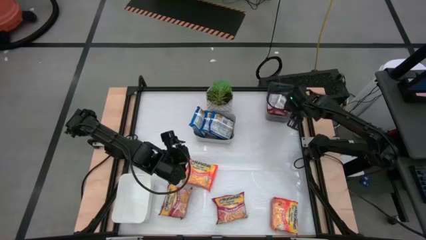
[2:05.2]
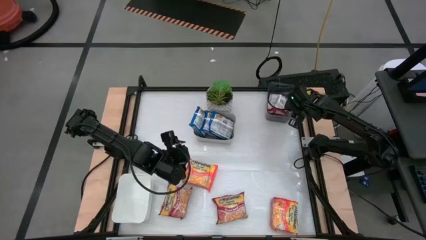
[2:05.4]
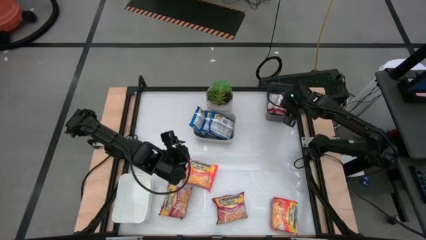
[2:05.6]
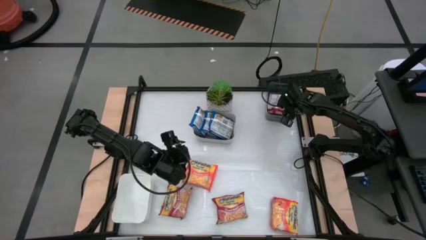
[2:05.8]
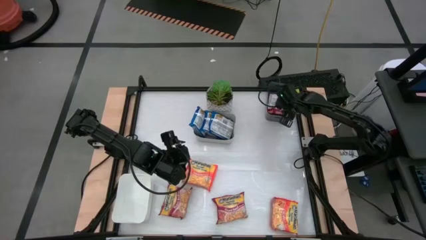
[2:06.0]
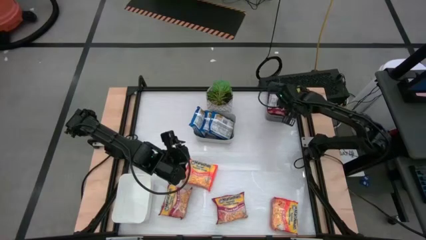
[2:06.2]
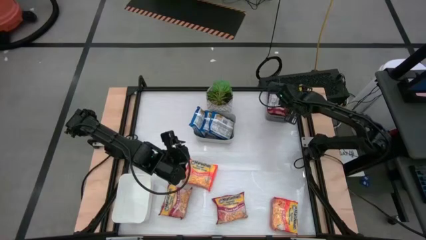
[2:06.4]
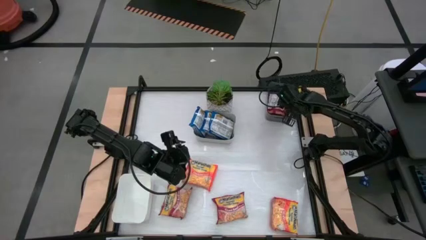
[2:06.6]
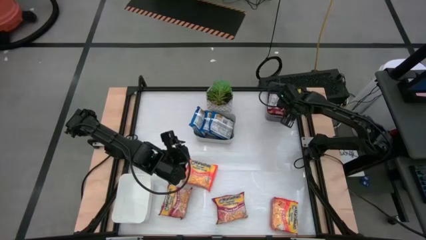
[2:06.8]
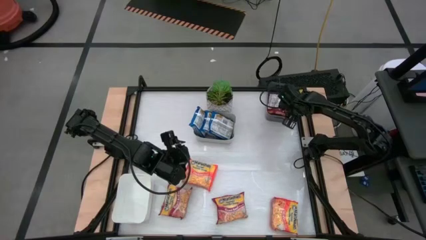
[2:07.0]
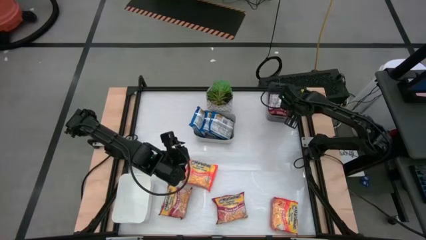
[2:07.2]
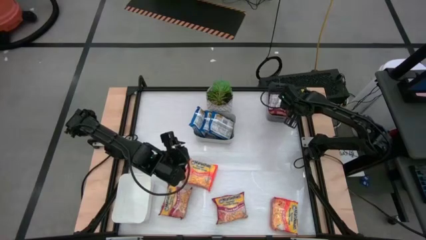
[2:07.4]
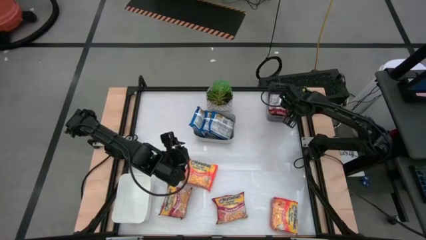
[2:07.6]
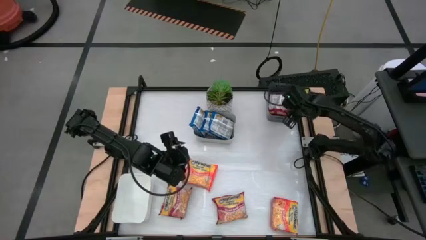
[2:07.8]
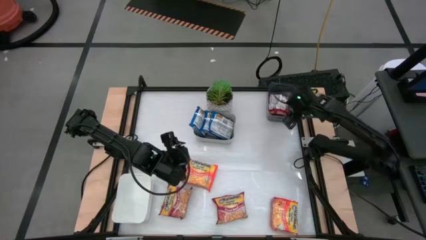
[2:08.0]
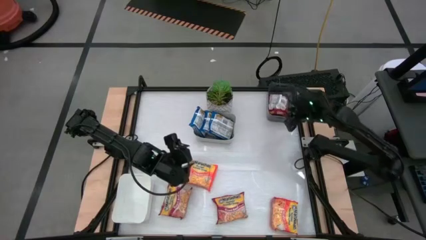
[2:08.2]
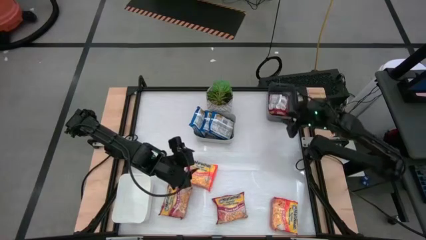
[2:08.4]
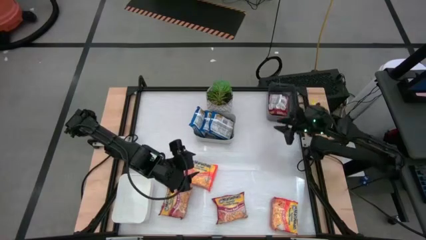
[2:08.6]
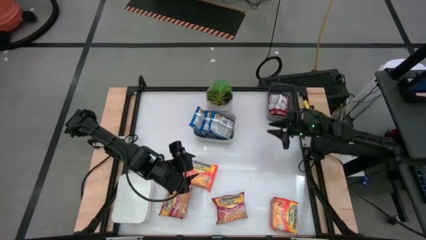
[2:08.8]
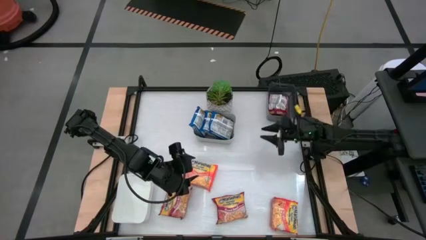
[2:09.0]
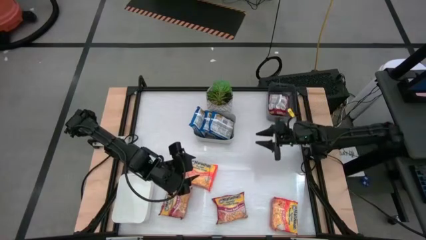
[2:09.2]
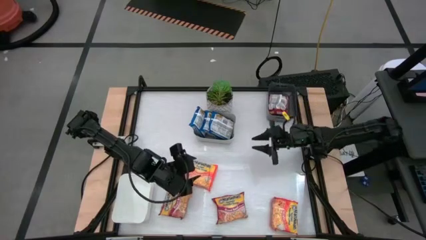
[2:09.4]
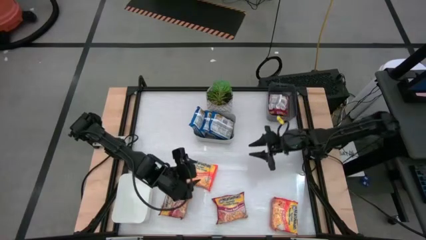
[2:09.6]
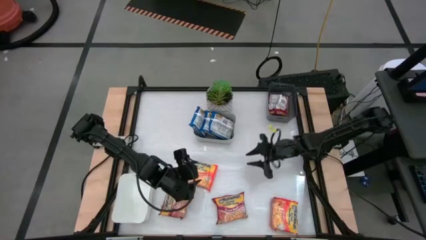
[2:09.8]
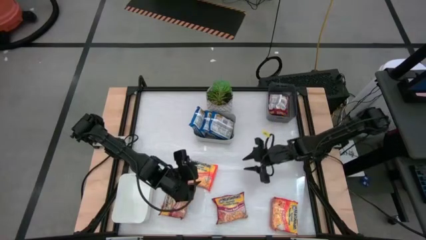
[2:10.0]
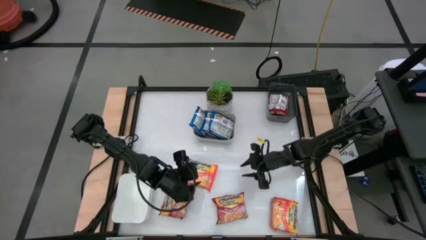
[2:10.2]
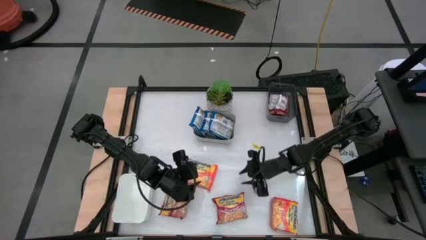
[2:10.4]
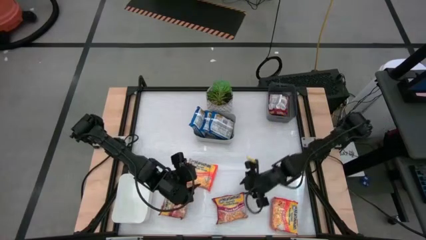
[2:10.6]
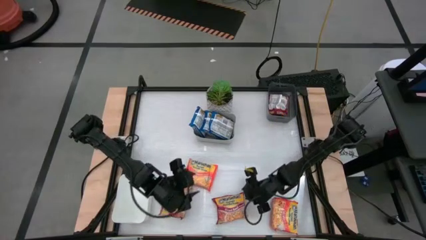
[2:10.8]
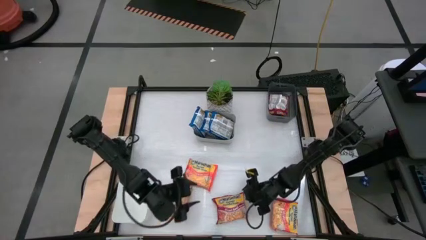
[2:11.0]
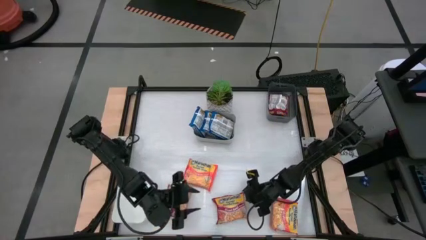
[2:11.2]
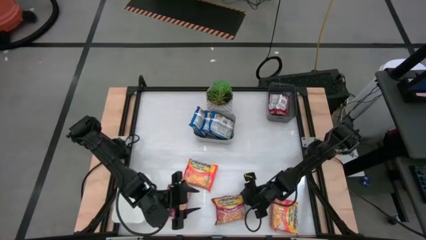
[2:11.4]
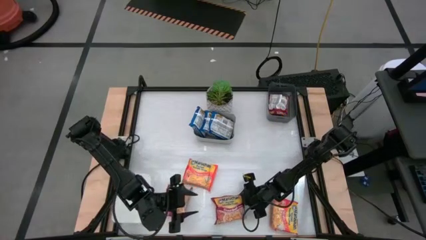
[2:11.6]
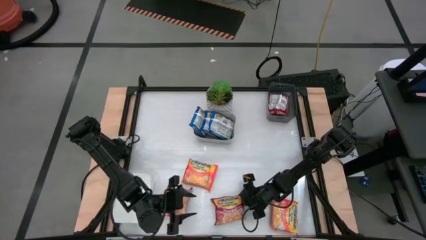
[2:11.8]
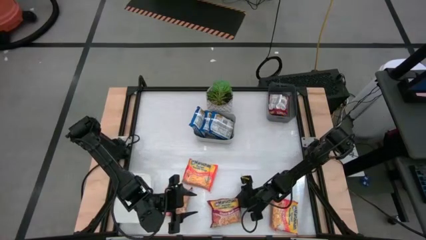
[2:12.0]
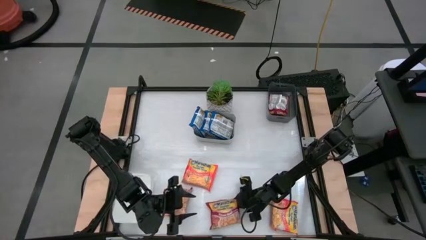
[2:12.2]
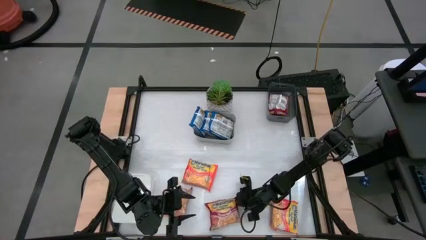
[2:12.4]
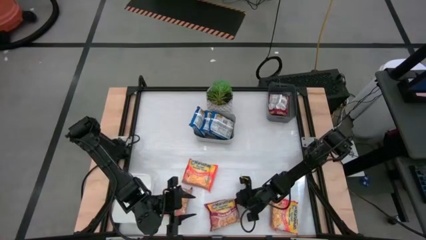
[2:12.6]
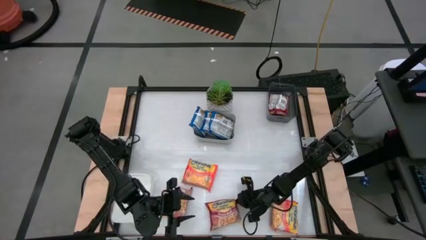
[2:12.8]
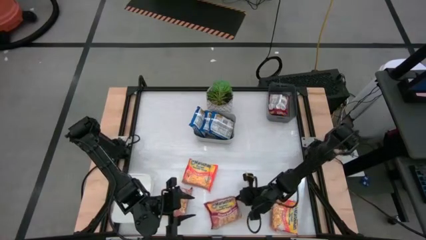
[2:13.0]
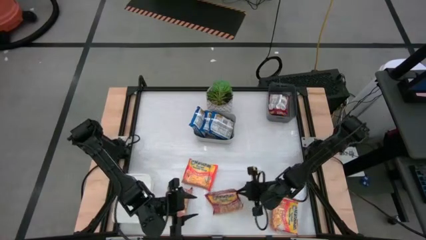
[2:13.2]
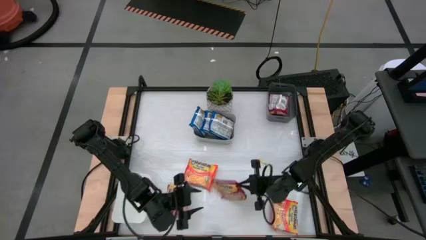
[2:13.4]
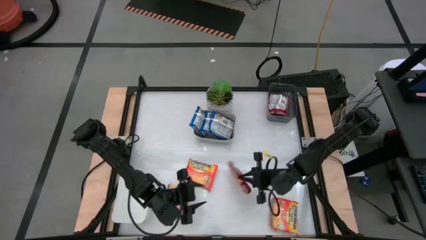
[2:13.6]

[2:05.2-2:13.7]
Task: Sort Maruchan noodles
Put the right red noodle pack into the black bin

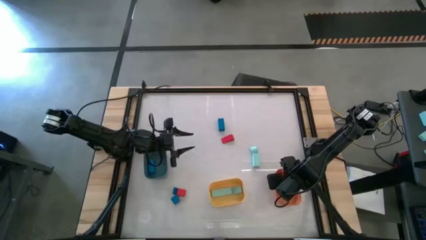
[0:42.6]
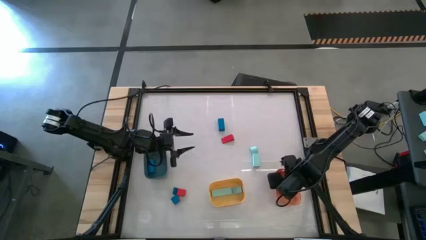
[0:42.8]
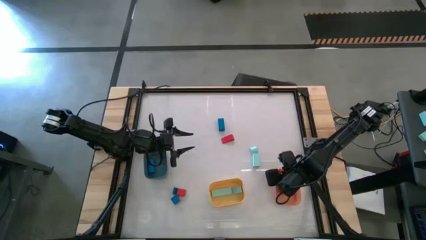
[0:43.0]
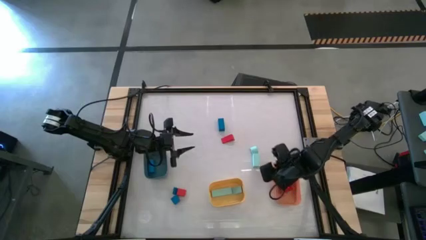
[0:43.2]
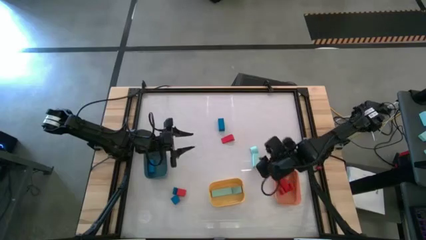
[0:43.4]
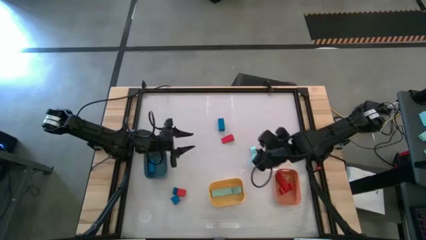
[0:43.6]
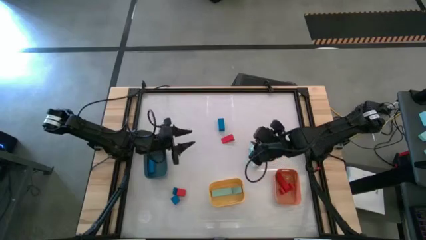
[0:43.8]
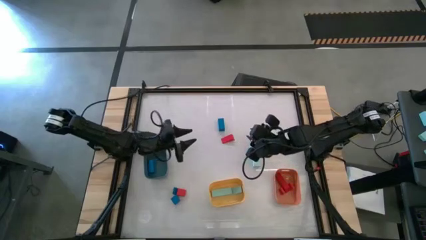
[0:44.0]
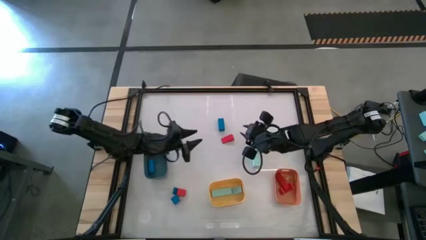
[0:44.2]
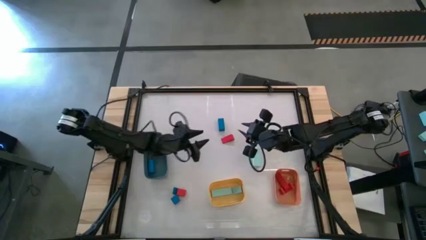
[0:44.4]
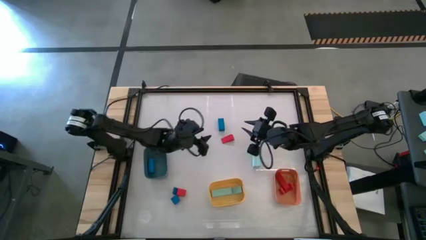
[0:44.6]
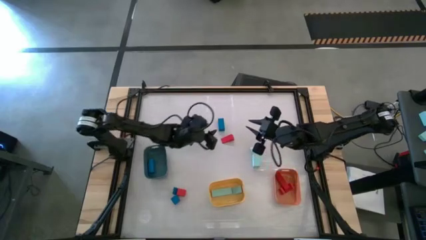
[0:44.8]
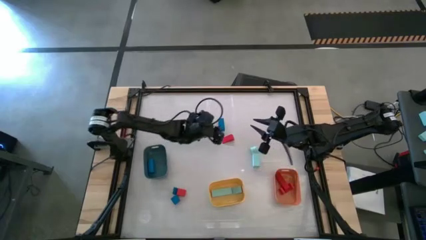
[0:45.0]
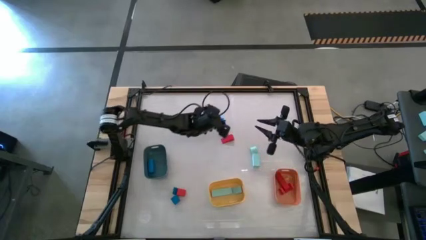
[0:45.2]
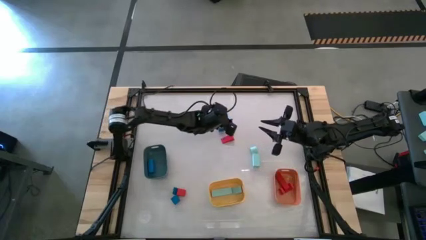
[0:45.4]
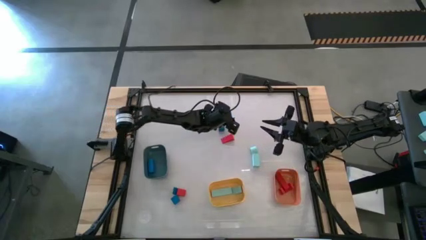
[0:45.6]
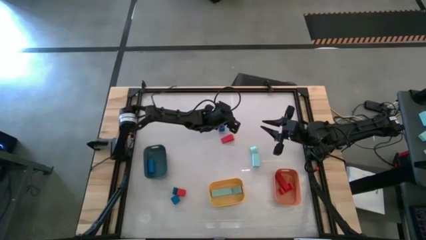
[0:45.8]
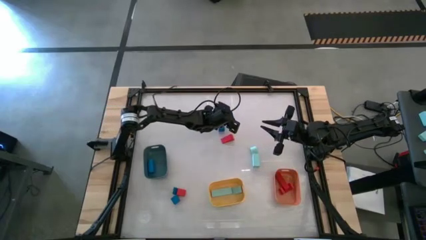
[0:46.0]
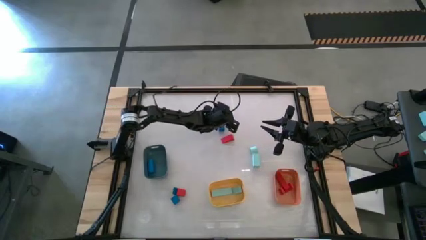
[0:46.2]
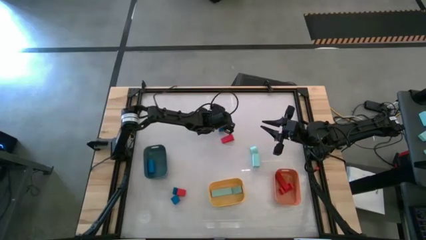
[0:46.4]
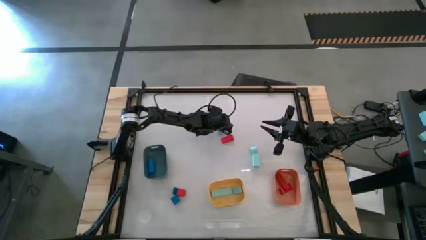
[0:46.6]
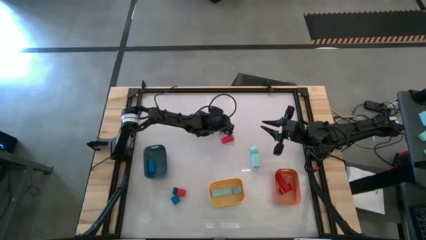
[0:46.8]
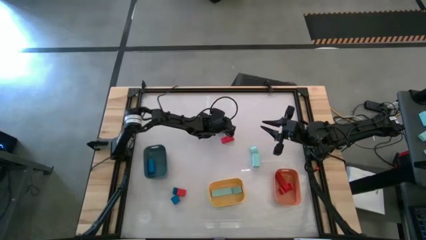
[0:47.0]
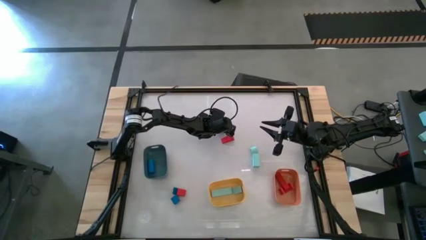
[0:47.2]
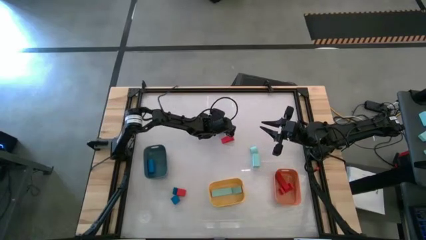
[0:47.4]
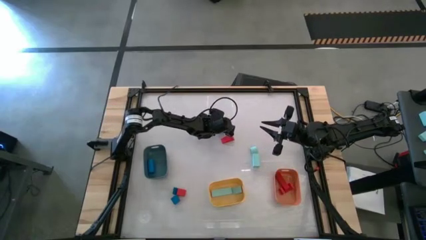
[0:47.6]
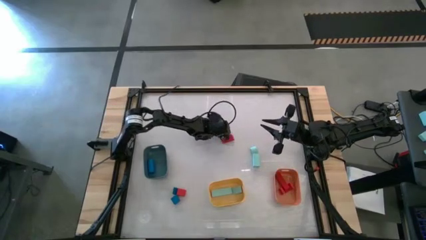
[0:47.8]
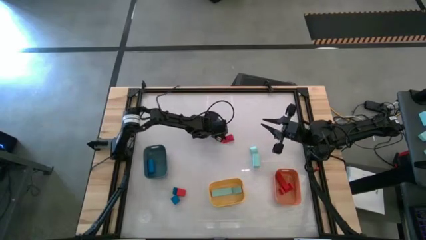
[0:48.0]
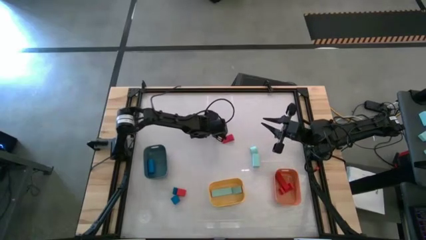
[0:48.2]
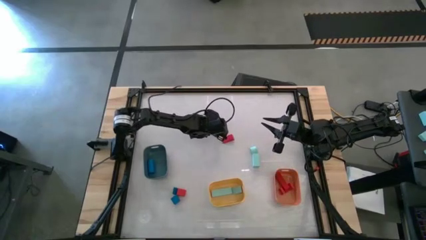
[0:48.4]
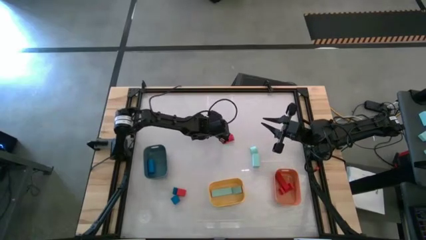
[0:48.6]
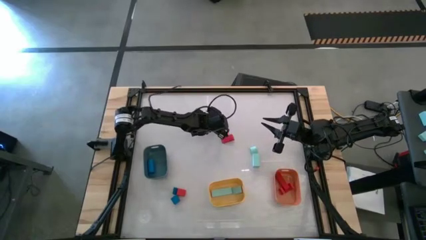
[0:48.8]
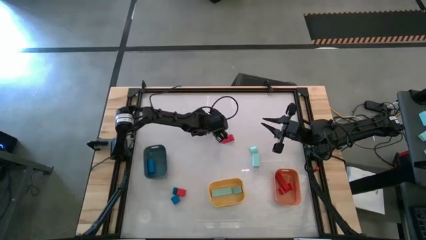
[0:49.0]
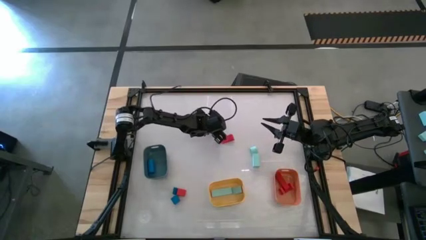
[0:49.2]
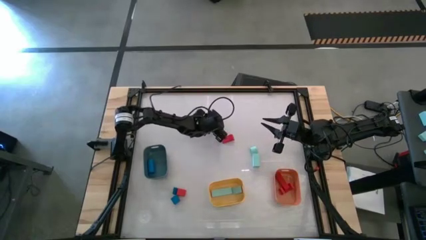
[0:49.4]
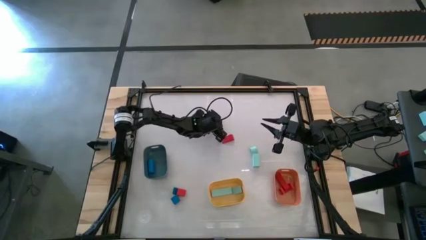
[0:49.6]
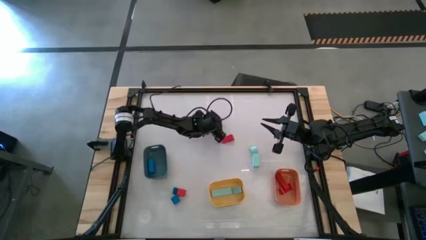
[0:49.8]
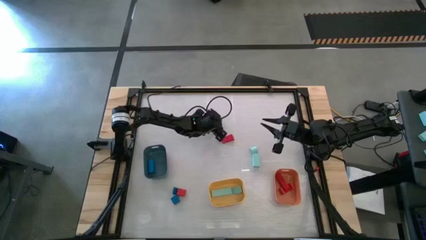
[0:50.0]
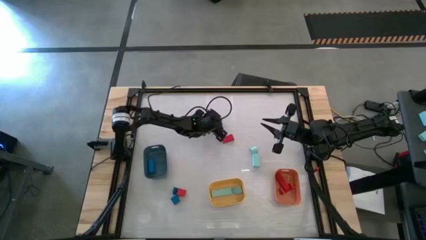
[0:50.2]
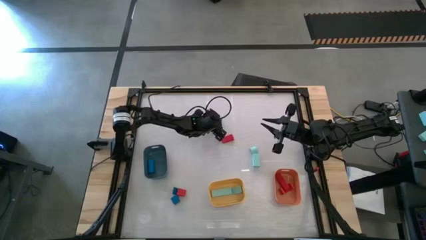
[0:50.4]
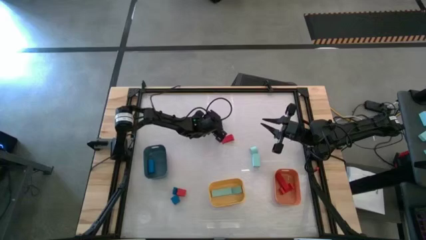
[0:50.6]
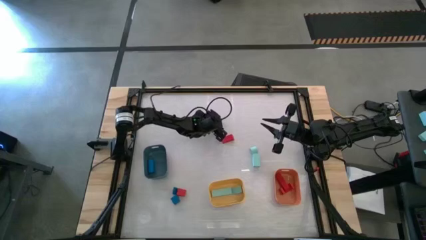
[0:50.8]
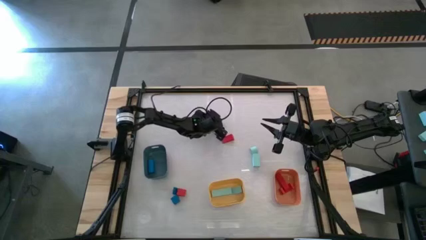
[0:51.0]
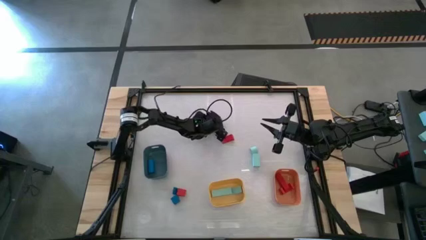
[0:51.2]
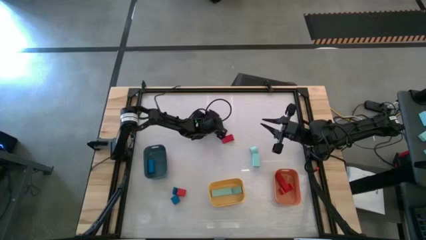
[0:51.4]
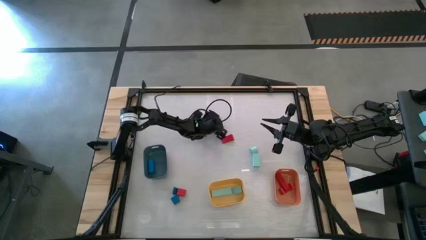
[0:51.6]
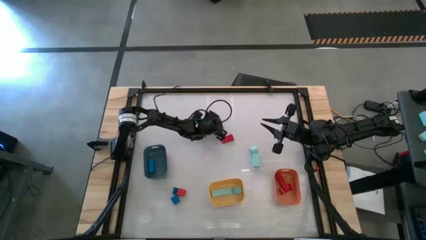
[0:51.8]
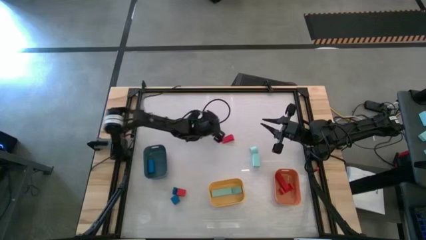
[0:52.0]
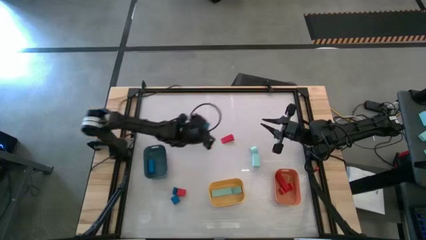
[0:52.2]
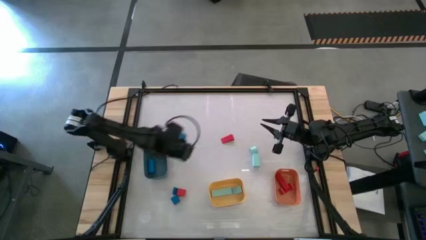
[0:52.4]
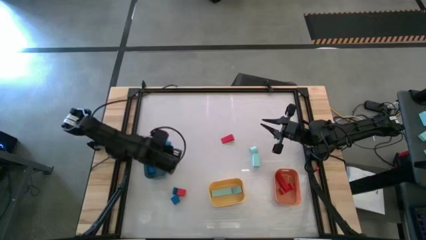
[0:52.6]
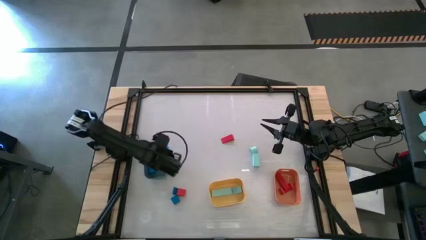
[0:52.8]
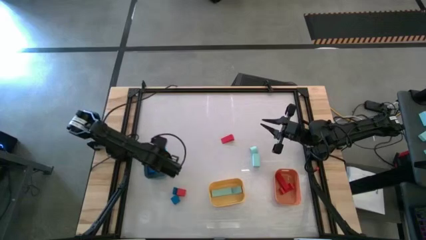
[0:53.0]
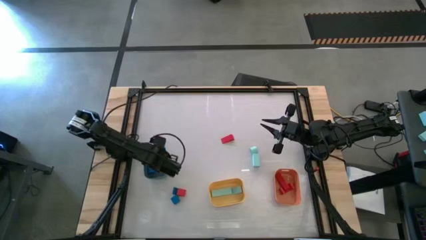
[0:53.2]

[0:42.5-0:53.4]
Task: Sort & place blocks by color
Put the blue block into the blue bin
